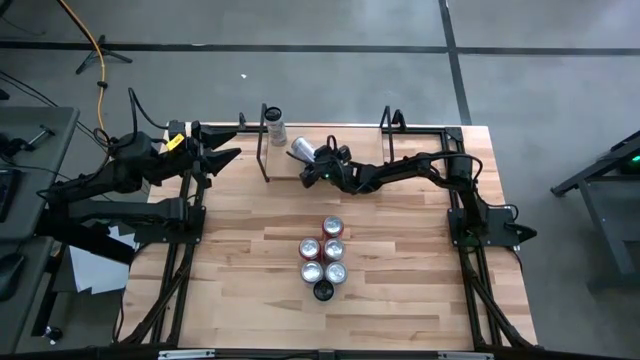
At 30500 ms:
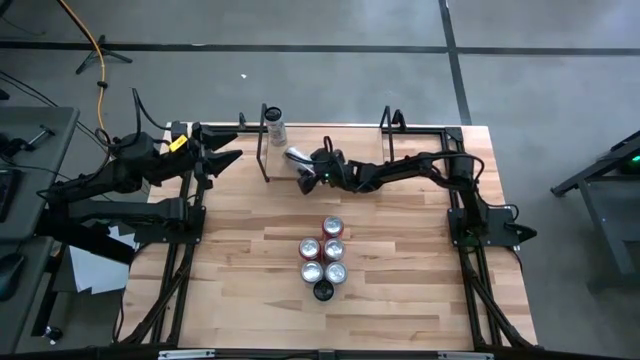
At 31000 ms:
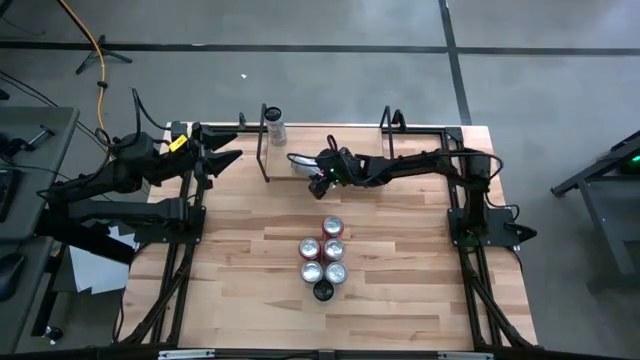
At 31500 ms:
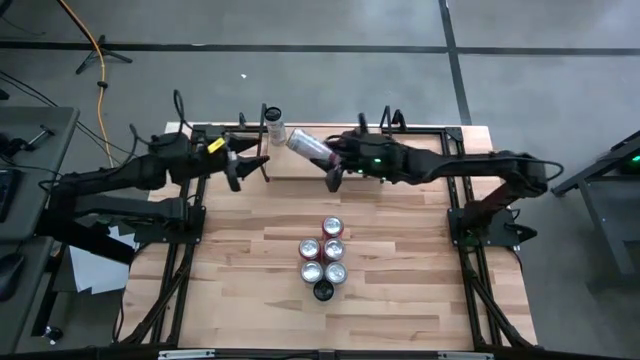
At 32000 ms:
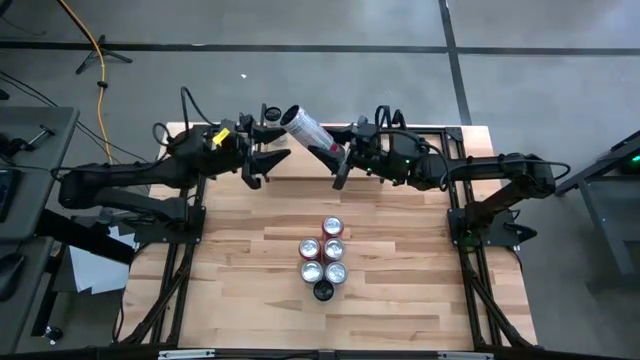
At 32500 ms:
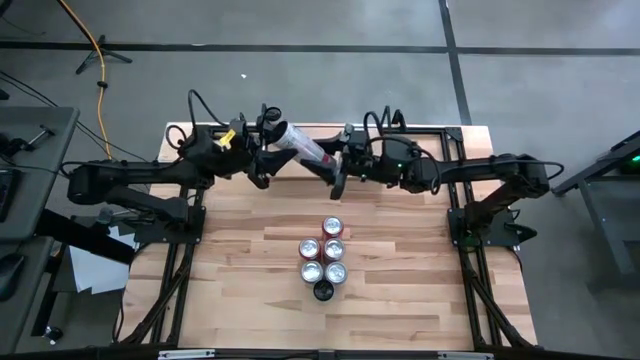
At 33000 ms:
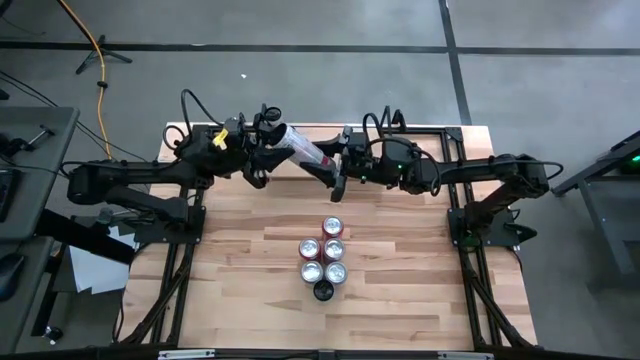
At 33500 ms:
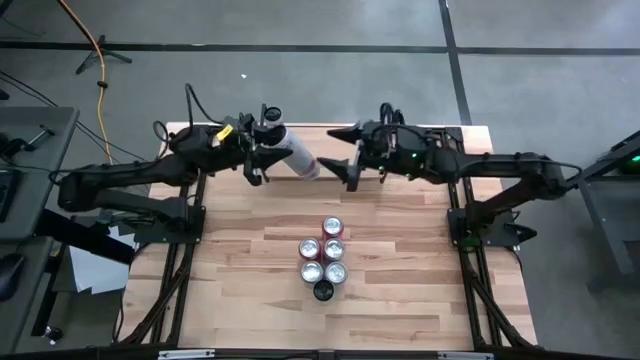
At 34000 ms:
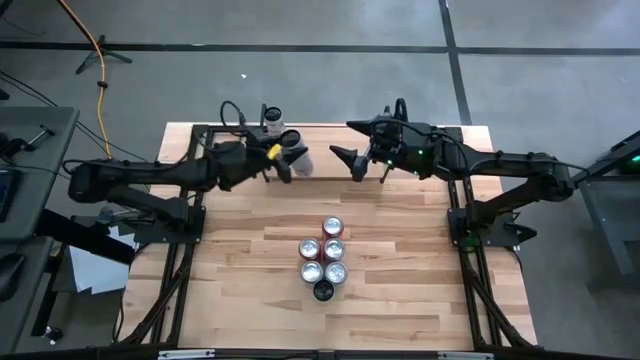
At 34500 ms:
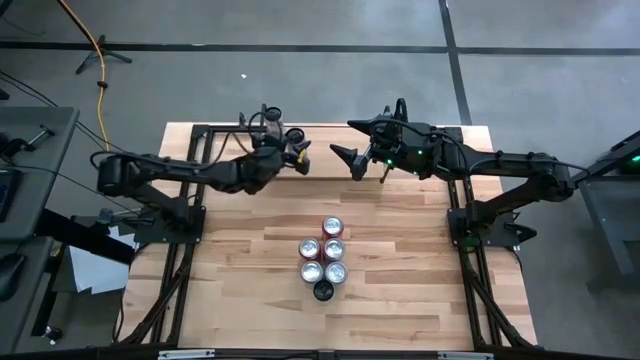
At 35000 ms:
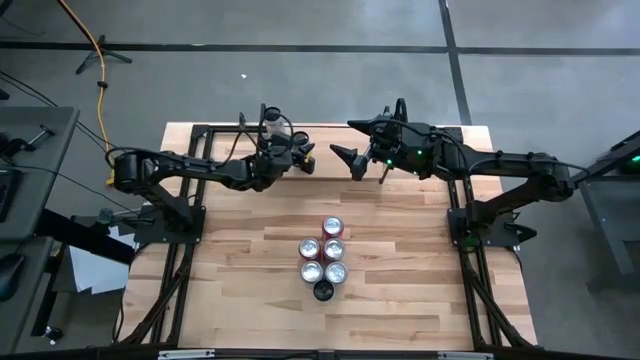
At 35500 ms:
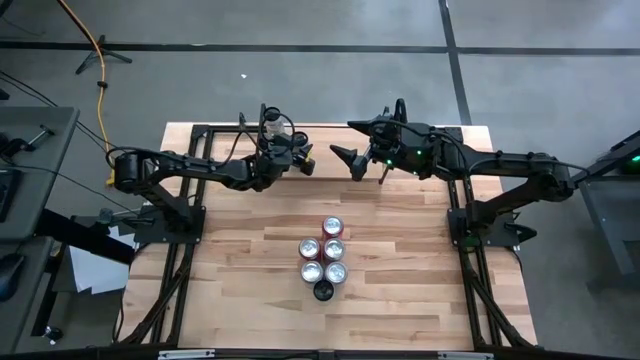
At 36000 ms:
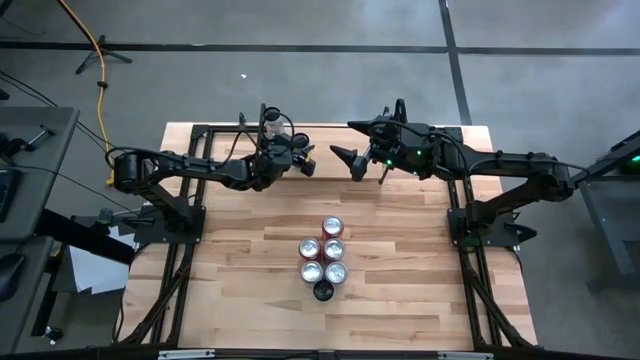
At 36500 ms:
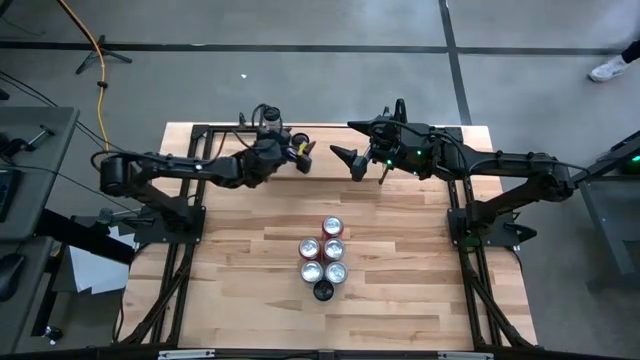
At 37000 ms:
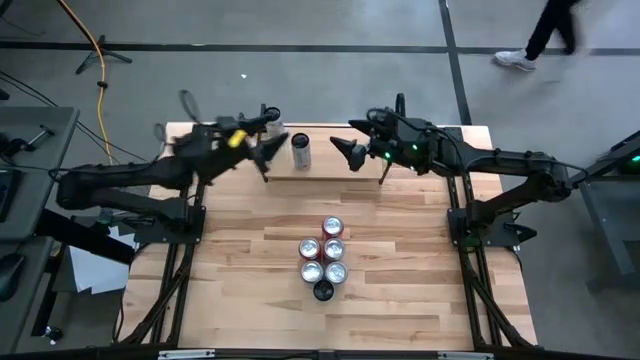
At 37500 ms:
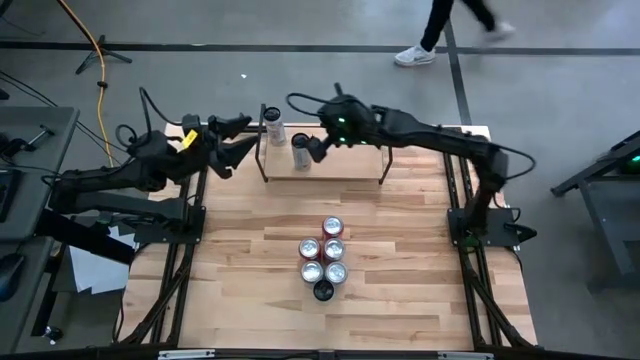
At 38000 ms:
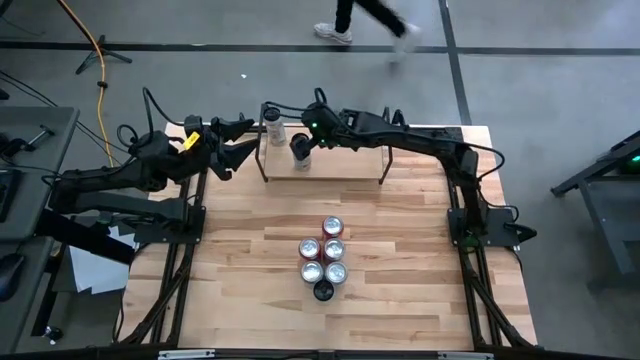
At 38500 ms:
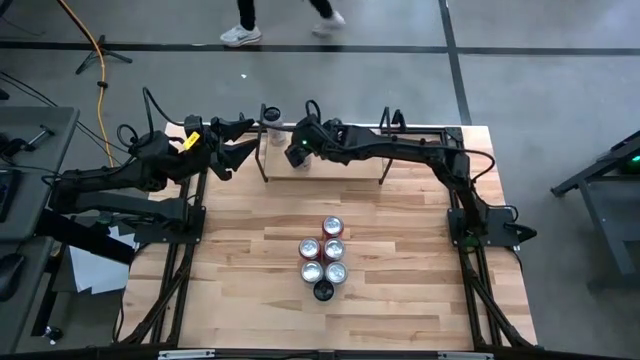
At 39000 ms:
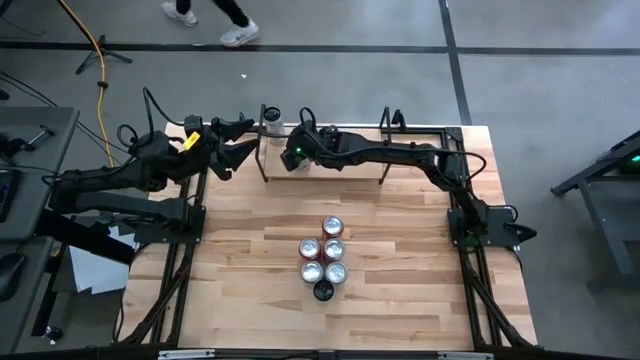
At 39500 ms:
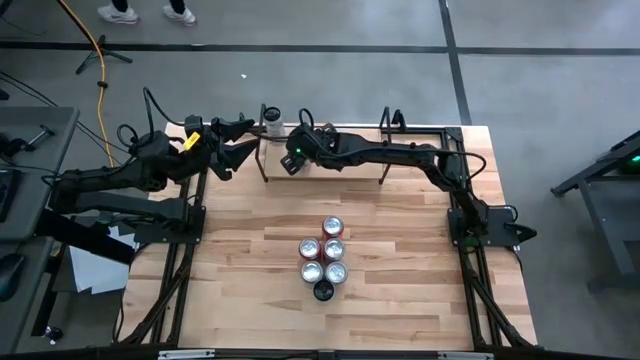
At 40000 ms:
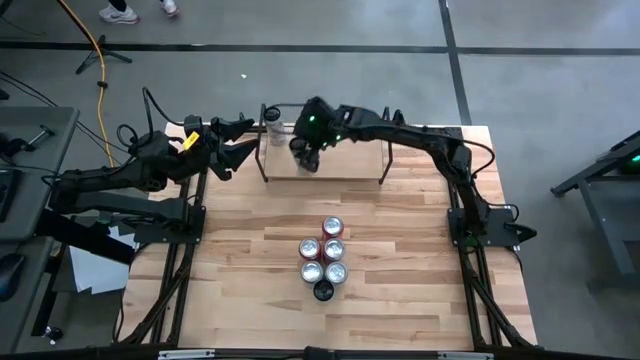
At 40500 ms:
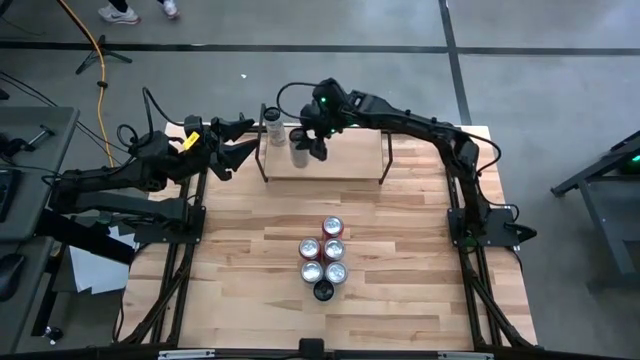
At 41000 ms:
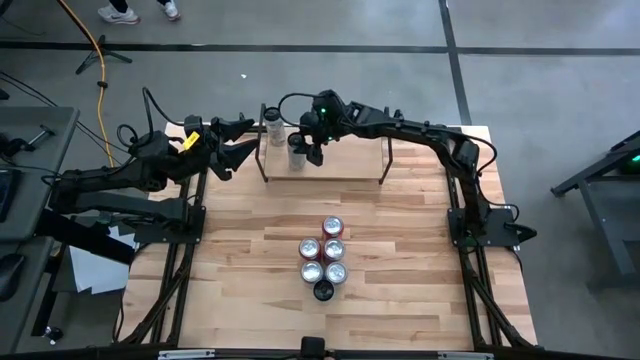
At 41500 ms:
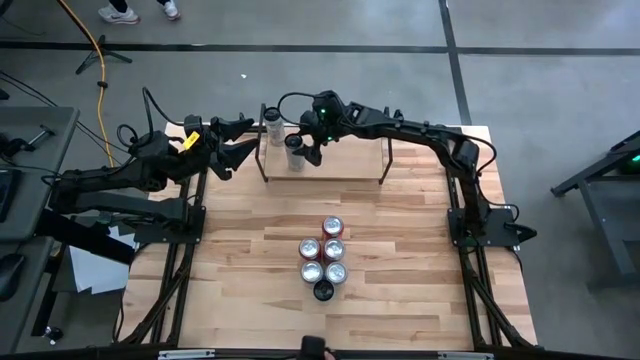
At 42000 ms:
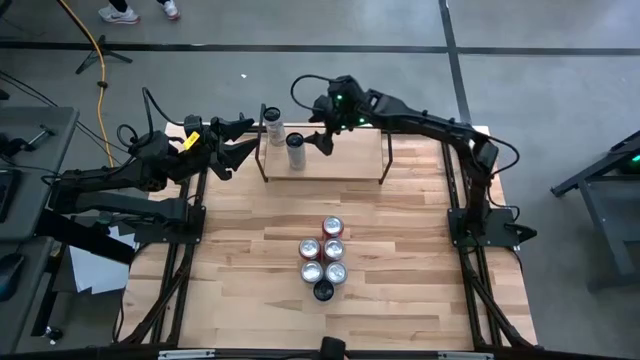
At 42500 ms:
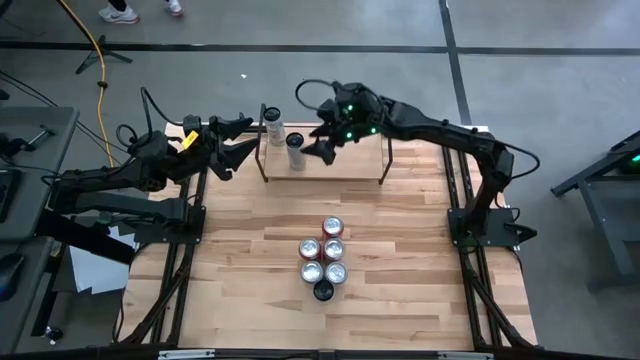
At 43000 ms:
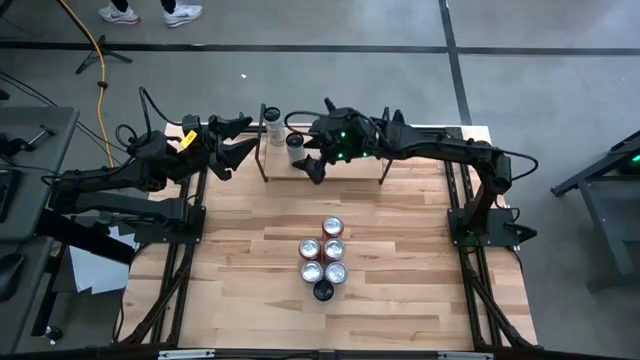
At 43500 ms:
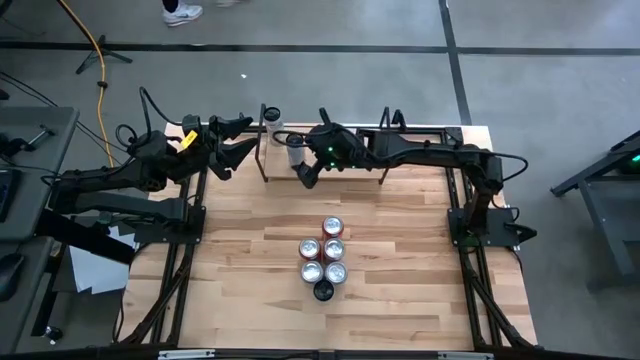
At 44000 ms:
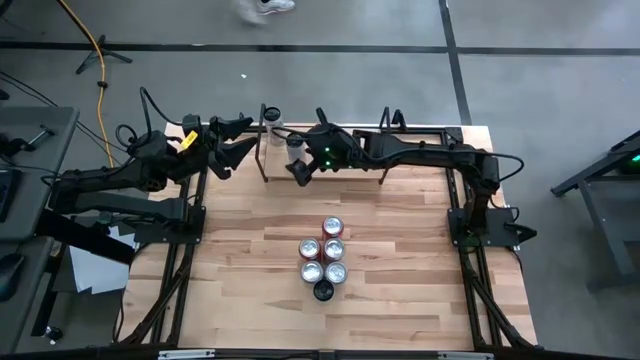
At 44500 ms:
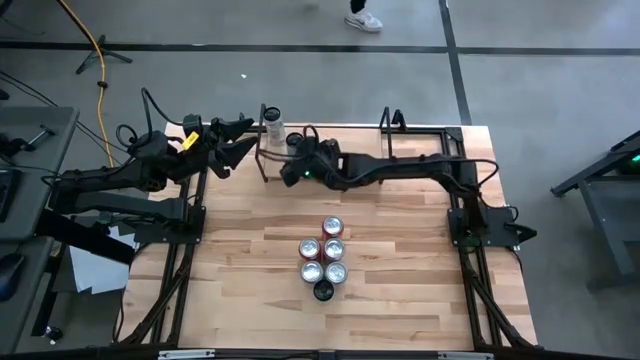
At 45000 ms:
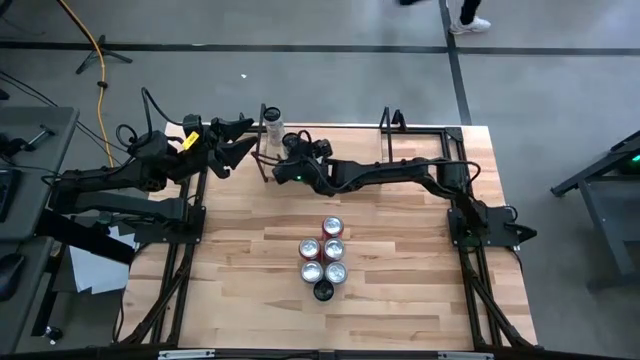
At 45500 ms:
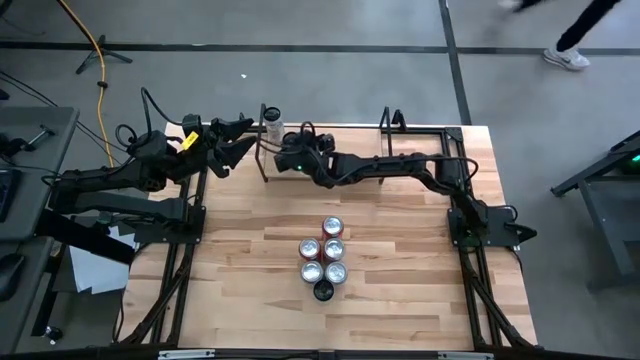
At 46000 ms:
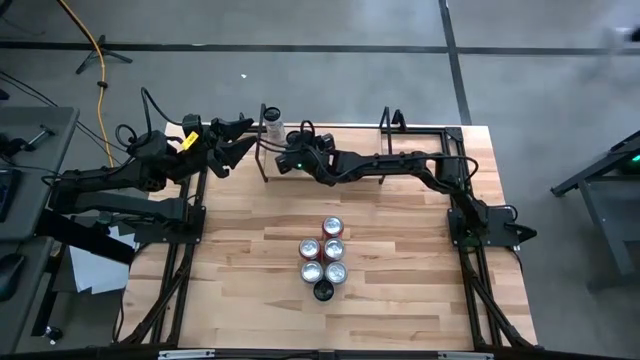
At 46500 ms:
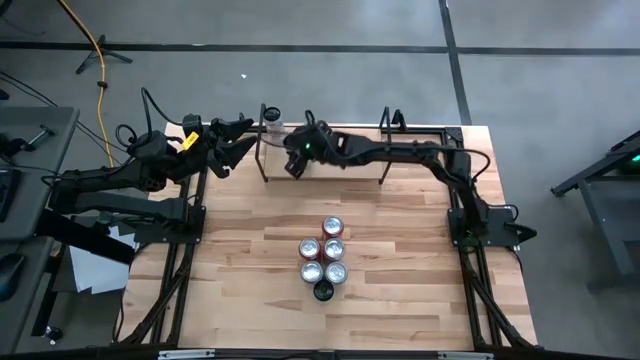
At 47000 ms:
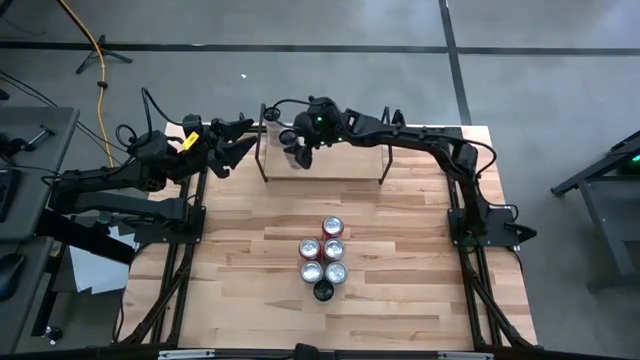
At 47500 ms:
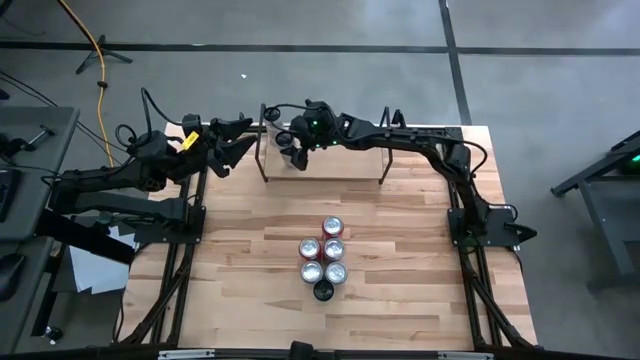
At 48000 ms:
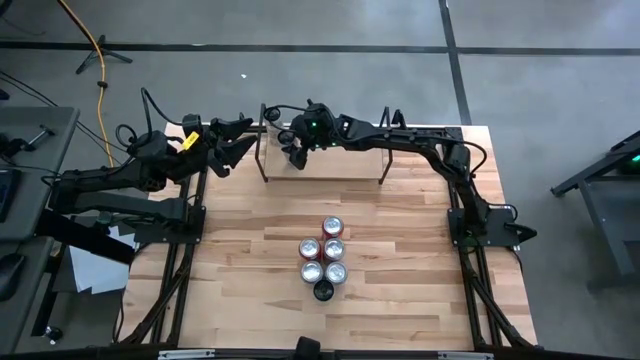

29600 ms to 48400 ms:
Task: Place canned beverage on shelf
Put the top white soda can aligned with the other white soda can on the shelf

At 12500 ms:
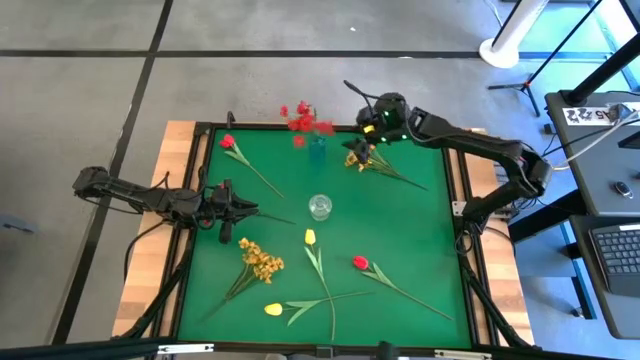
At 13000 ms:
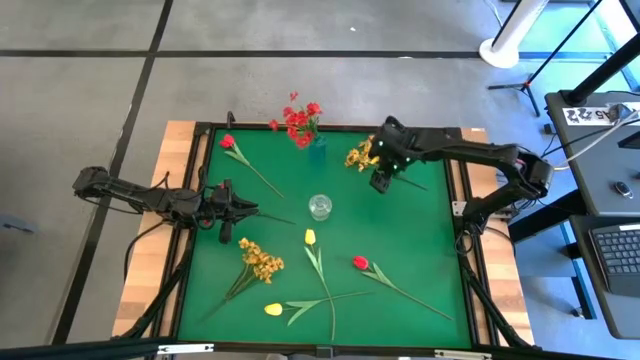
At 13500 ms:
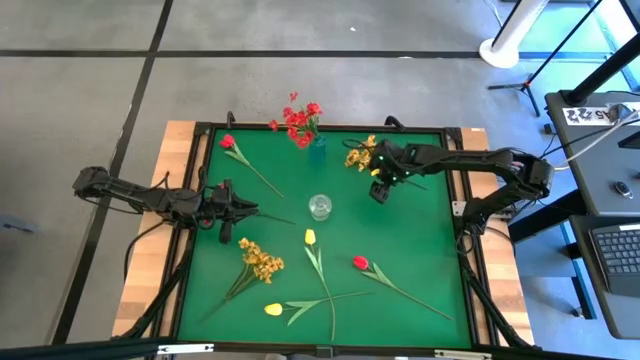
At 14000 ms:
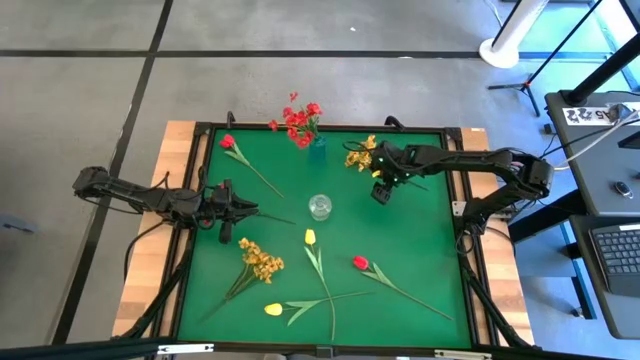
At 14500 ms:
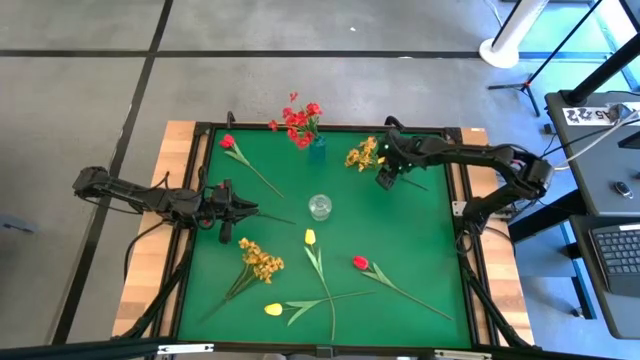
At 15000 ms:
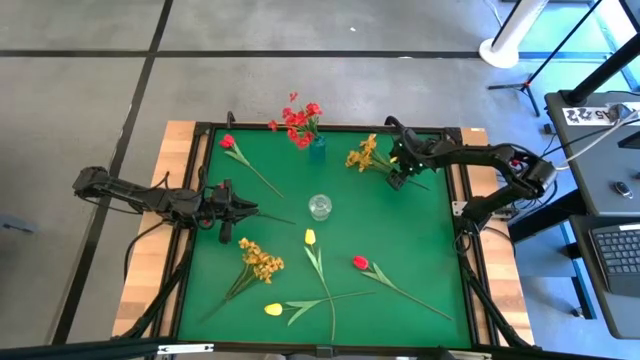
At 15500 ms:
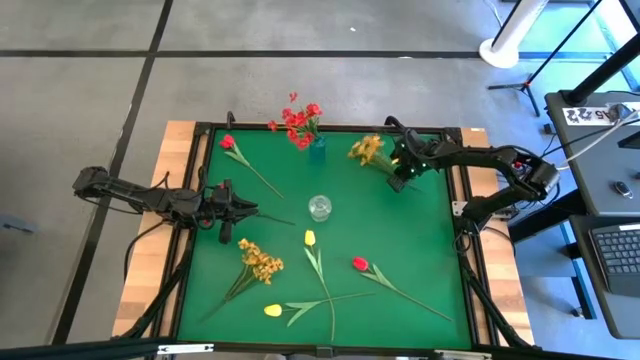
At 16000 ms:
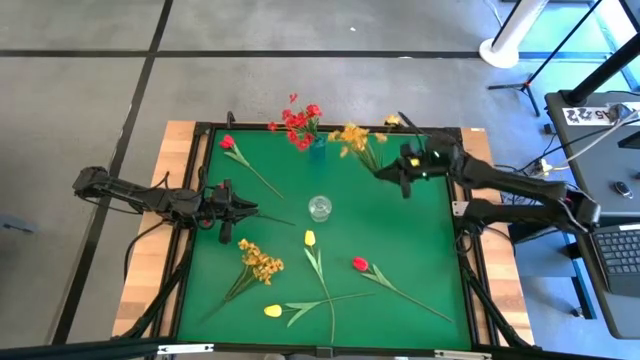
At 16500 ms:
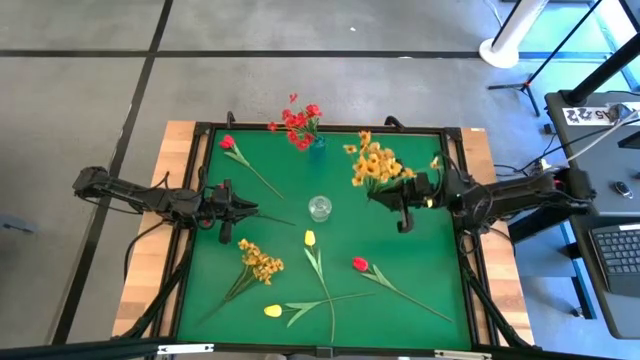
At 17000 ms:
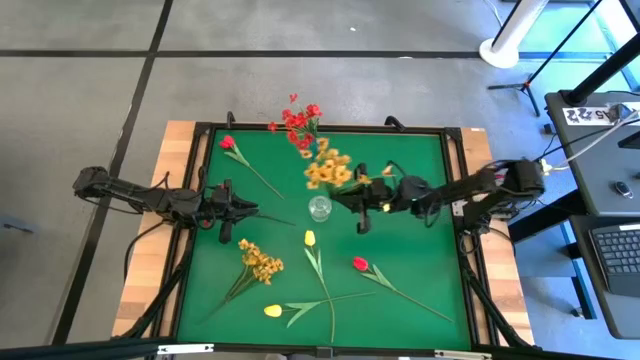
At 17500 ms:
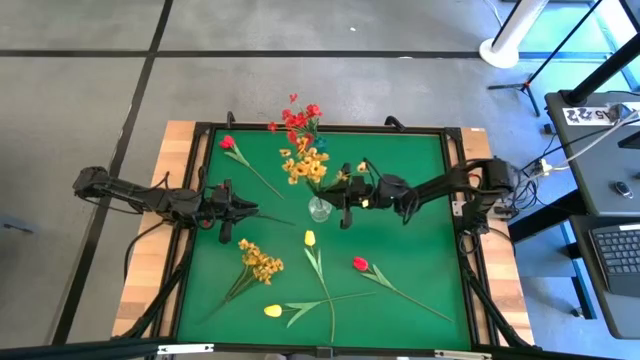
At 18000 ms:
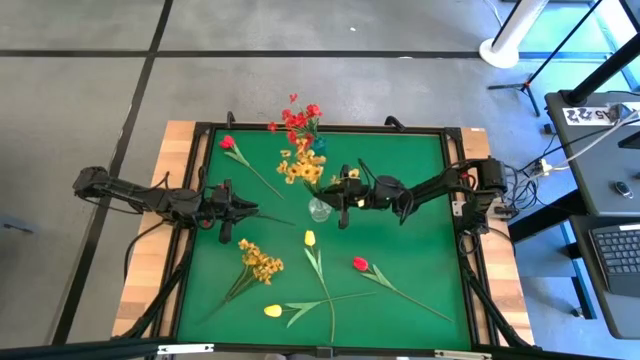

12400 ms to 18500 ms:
Task: Sort flowers into vase by color
Put the top yellow flowers into the transparent vase
